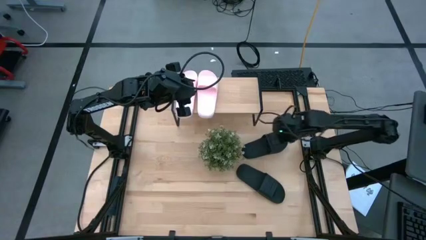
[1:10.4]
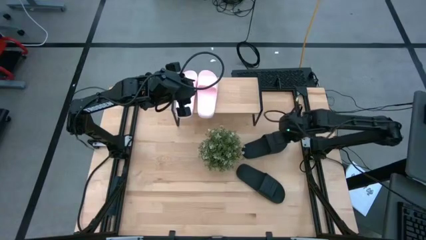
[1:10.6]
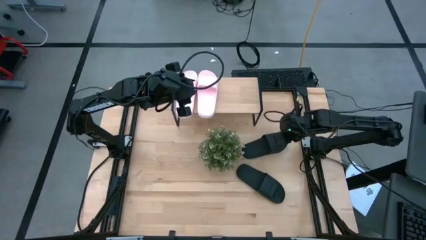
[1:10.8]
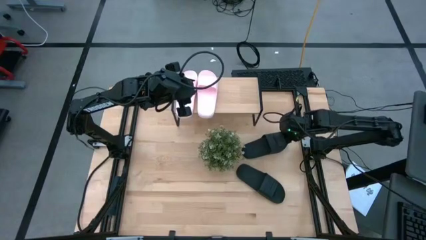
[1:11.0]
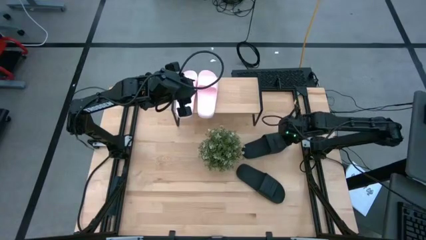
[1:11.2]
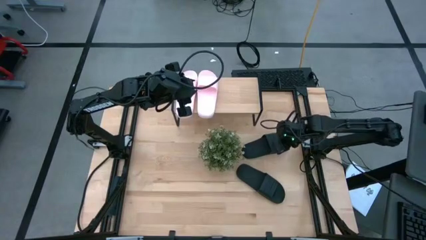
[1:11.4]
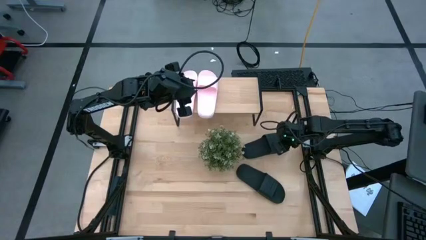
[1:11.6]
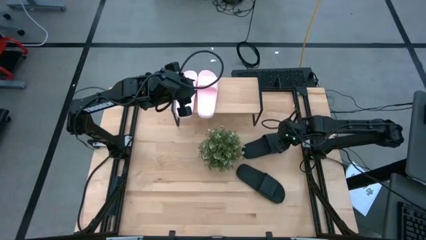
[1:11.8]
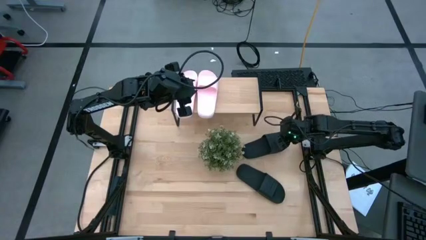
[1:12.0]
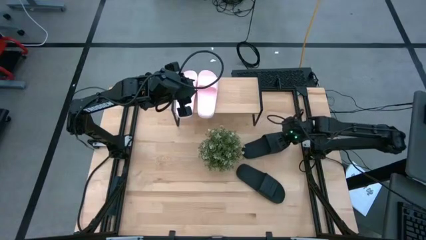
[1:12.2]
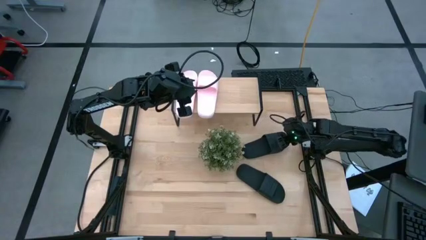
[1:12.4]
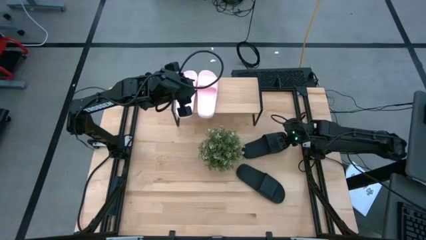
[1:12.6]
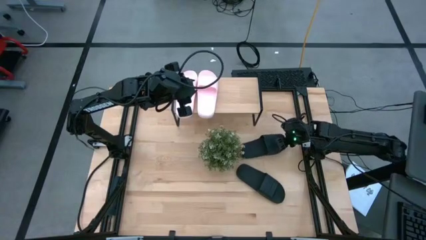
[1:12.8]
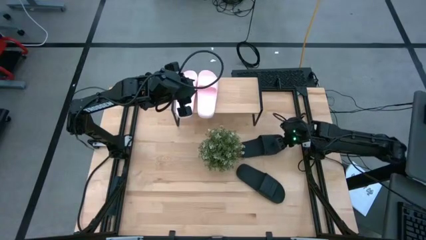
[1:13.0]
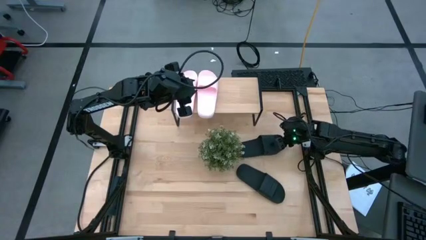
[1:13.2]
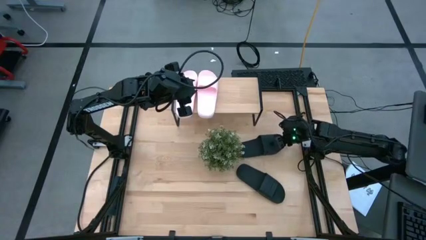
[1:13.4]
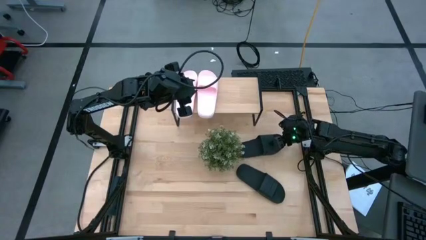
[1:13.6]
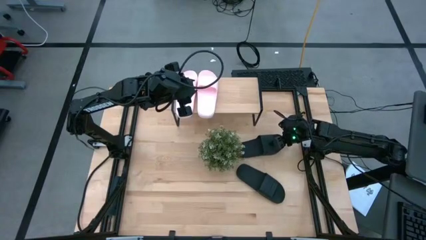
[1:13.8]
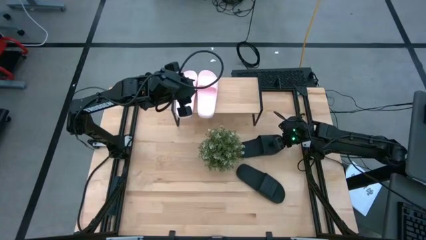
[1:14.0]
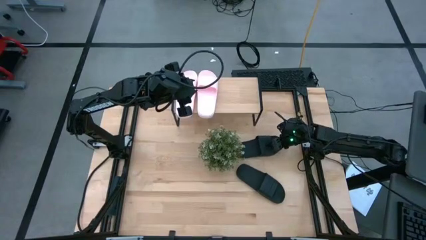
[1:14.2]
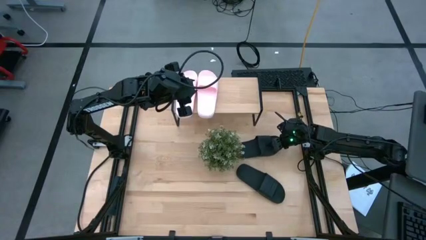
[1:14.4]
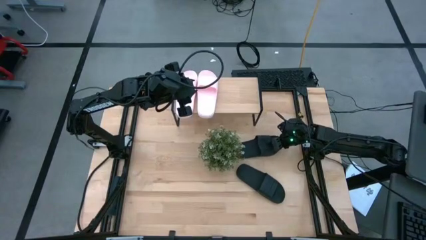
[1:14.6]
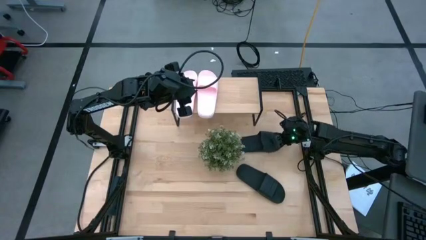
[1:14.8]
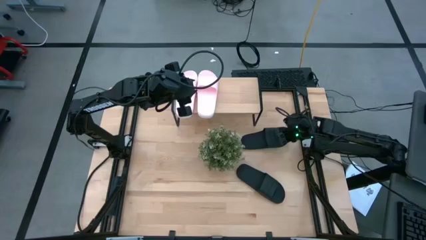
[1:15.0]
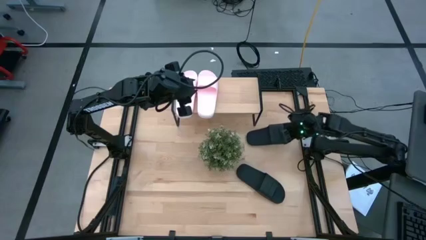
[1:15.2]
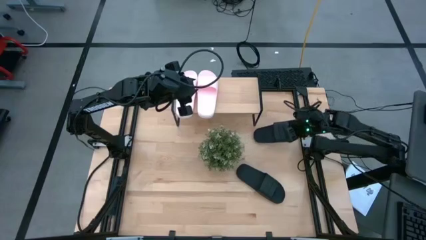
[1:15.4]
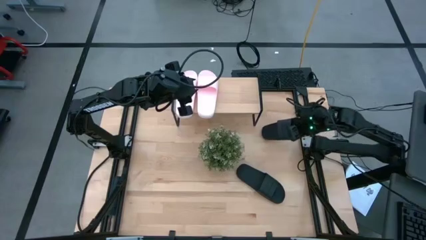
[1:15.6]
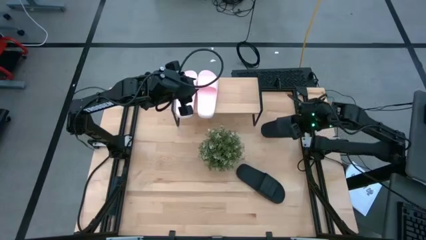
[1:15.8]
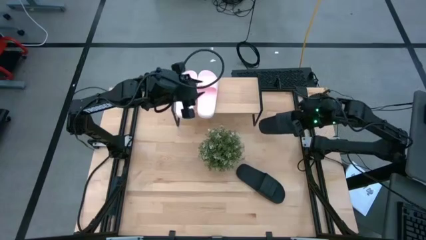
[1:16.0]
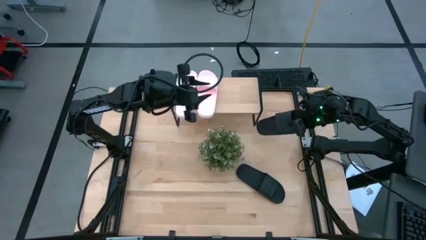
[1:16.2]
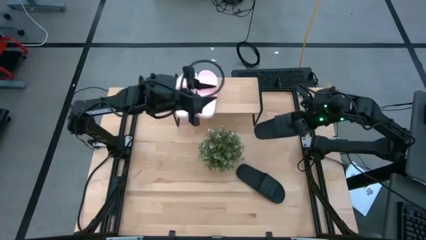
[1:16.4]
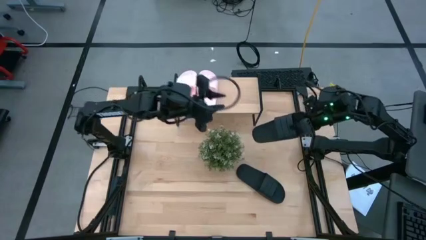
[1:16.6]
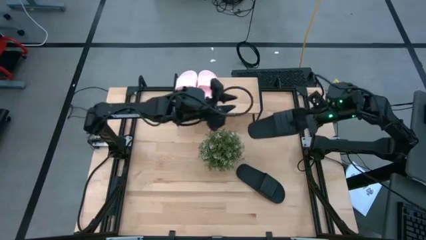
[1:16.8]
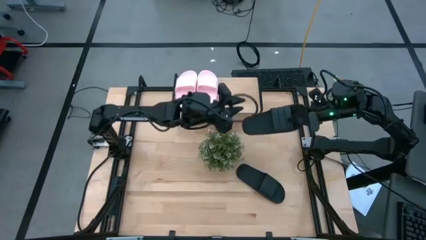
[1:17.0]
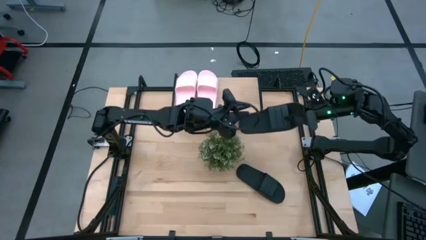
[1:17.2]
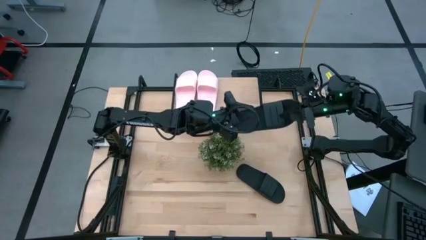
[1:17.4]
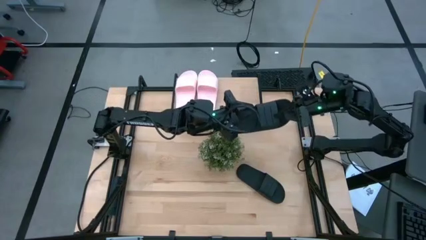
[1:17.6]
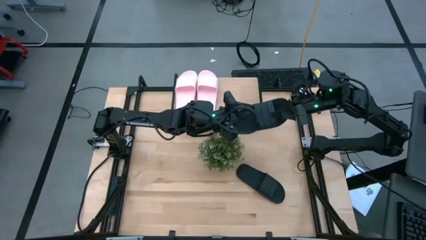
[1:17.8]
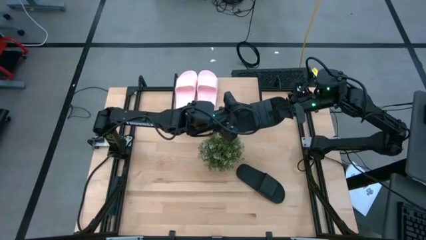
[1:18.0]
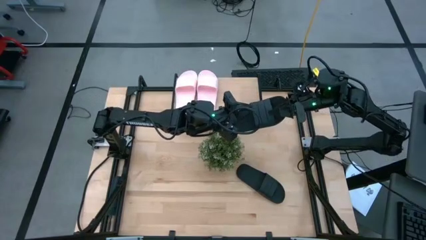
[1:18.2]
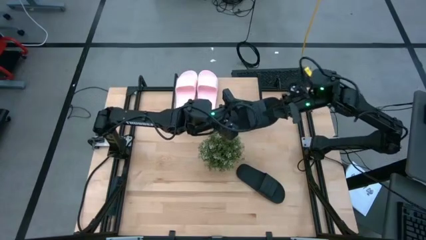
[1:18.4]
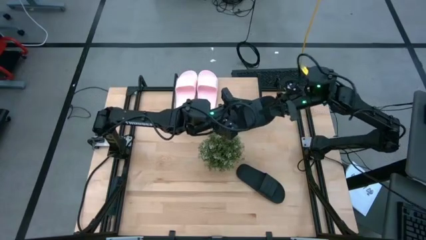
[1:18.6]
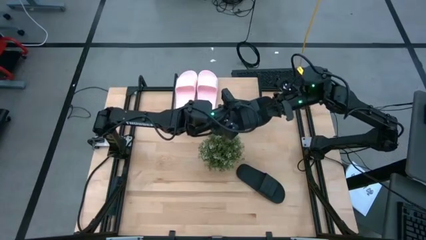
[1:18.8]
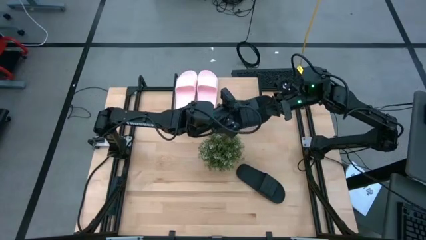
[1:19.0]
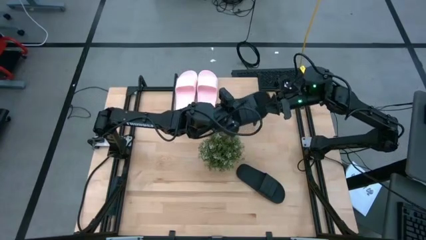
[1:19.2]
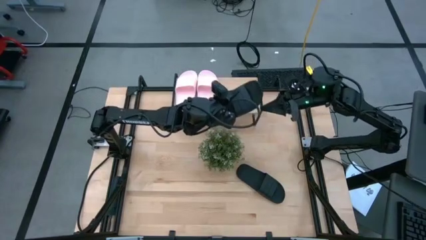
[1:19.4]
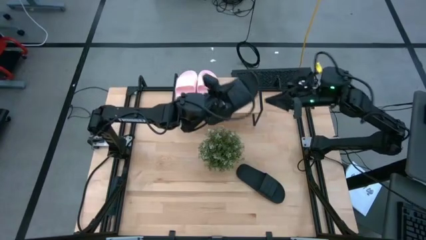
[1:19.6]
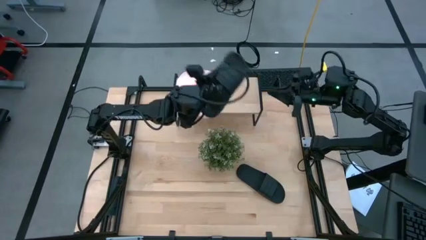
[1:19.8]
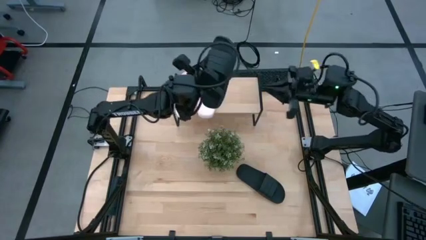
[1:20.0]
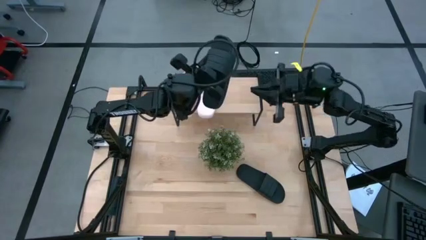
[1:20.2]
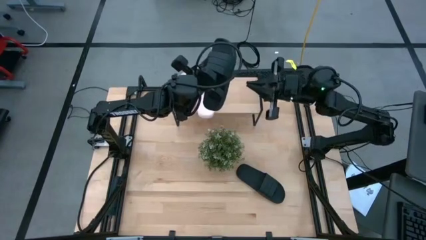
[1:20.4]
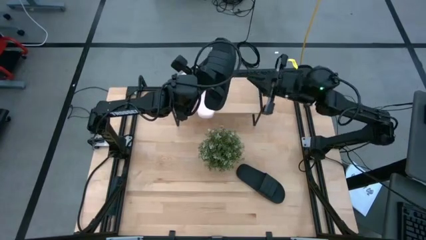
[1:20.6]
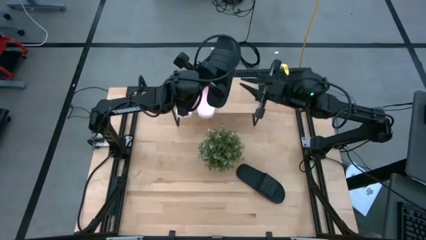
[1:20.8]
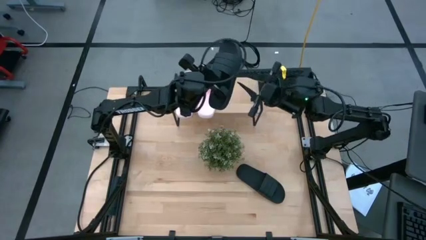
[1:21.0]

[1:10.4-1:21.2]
Task: Pick and place slides into the shelf
Put the top black slipper on the shelf

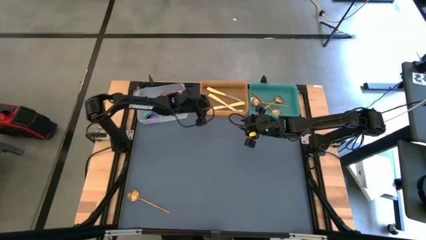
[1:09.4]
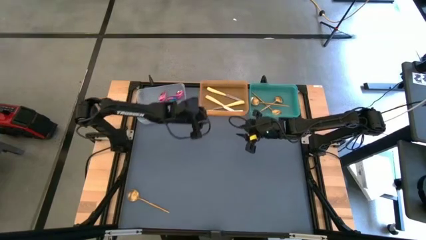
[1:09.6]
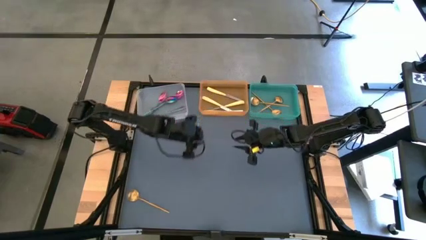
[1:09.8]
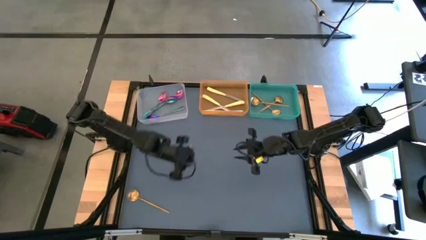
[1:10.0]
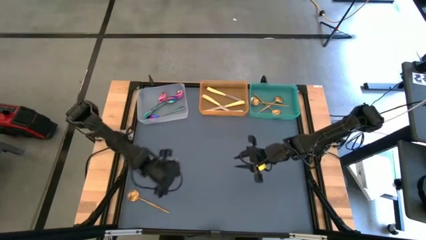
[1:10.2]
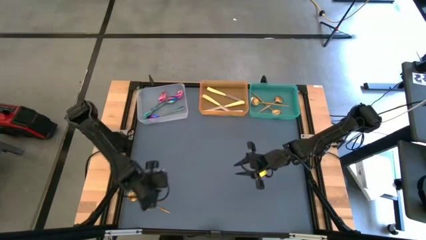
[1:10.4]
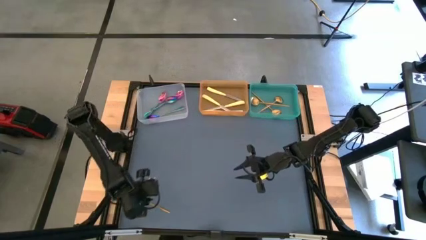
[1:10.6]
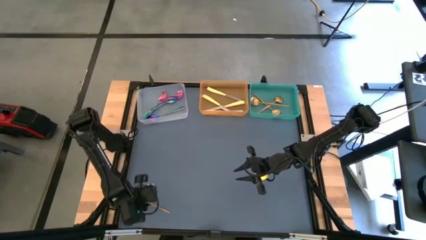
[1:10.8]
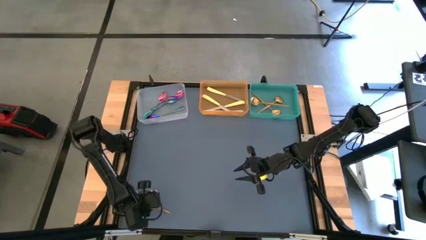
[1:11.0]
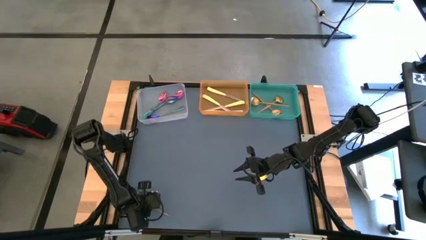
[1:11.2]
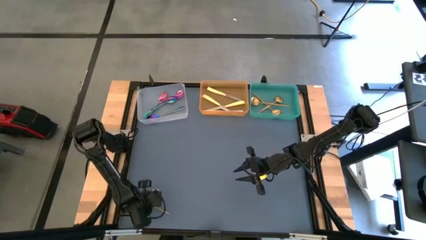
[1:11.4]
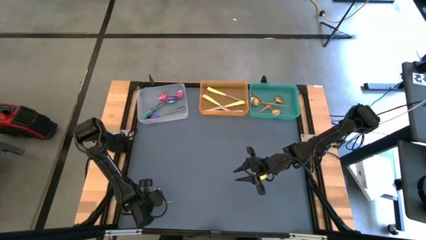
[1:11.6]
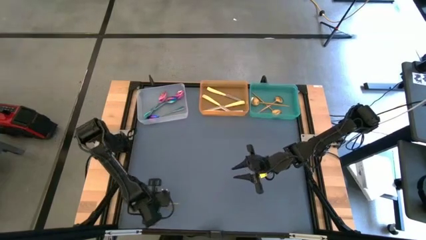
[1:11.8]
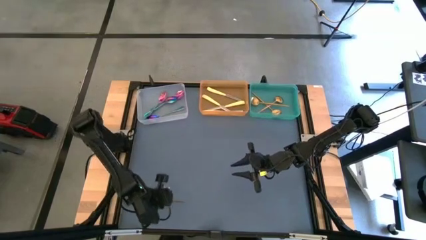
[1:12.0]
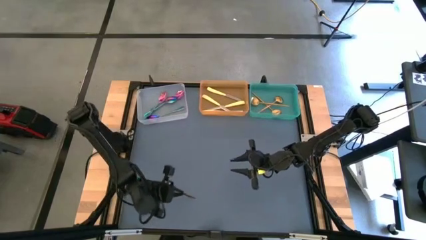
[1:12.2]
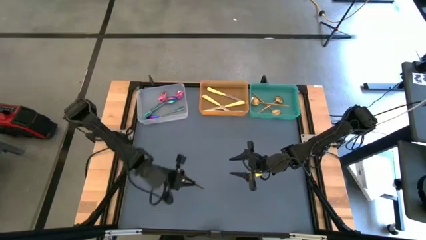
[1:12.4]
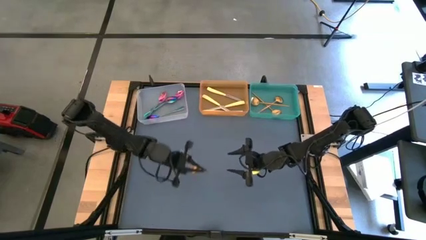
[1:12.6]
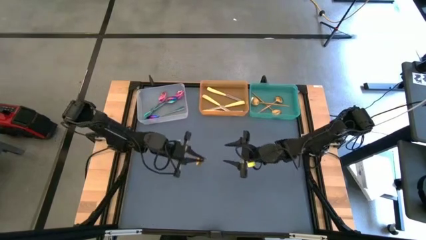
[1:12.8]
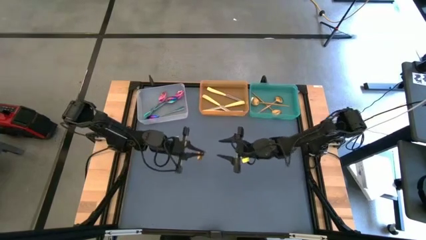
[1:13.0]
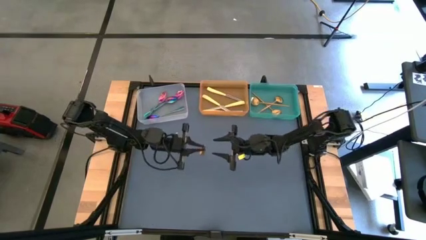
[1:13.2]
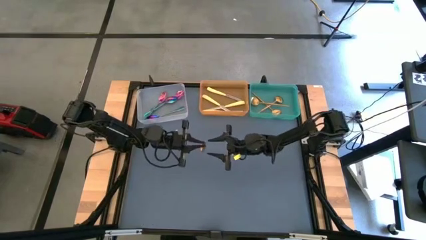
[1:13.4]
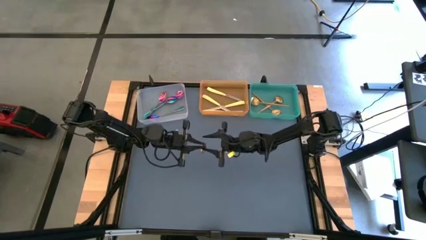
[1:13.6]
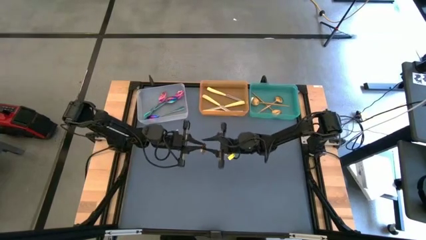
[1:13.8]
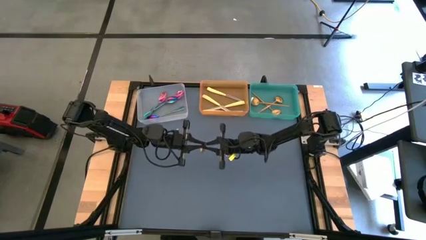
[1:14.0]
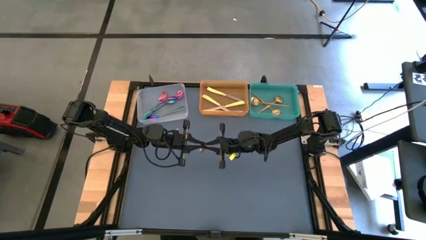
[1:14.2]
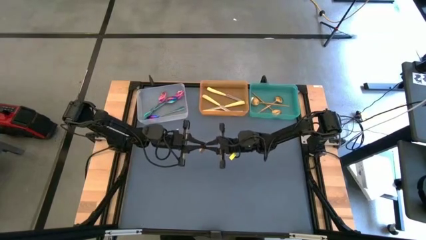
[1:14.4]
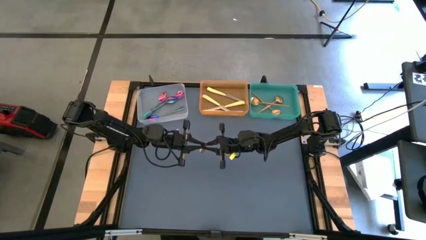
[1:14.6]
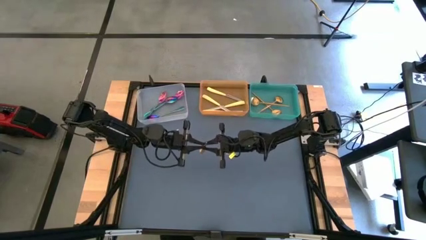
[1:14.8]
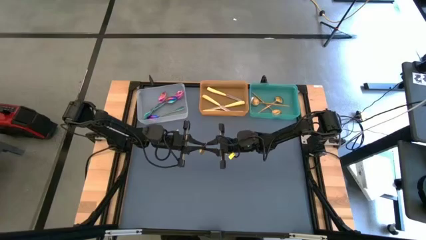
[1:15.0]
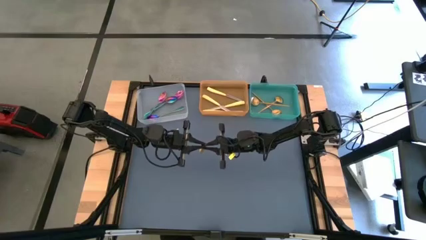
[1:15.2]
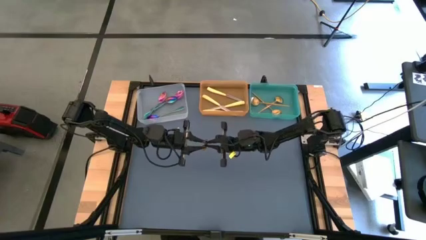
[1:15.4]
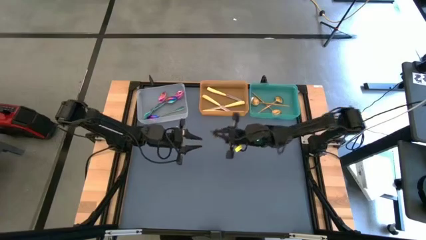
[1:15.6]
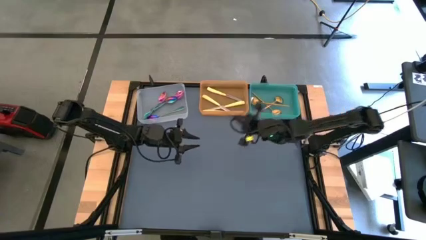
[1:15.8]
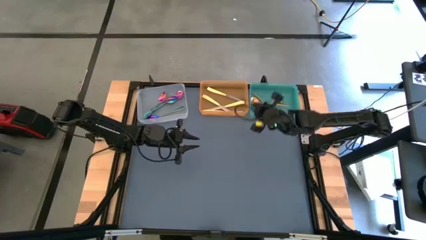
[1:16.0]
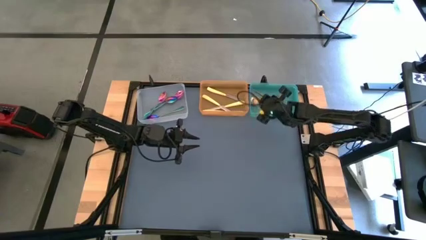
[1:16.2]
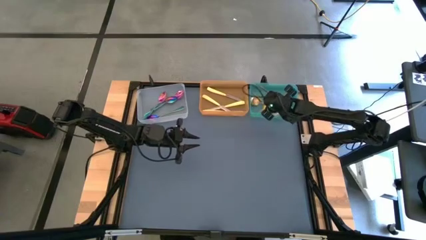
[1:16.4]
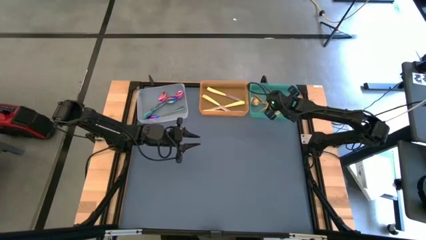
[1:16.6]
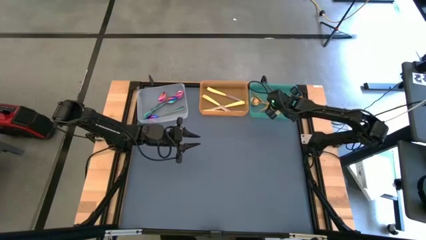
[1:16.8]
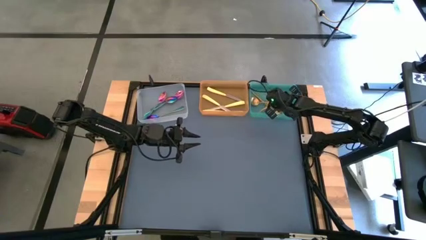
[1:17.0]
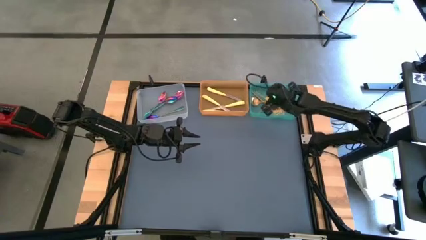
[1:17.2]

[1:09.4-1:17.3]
Task: Sort silverware by color (type)
Put the golden spoon into the green bin
